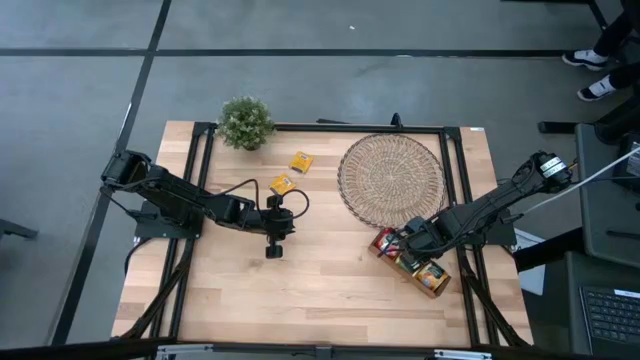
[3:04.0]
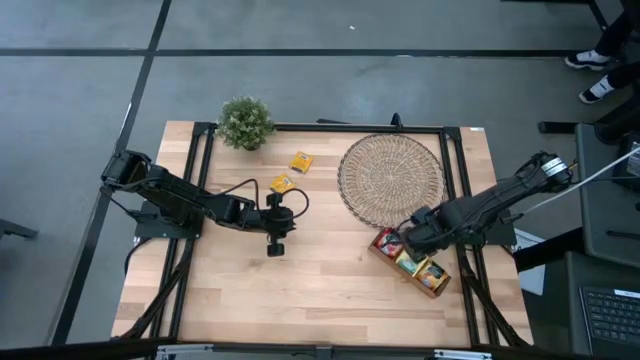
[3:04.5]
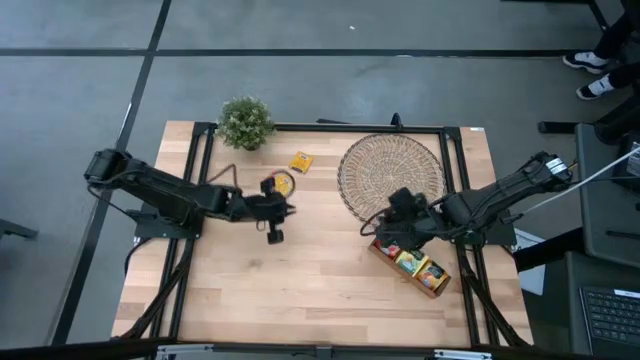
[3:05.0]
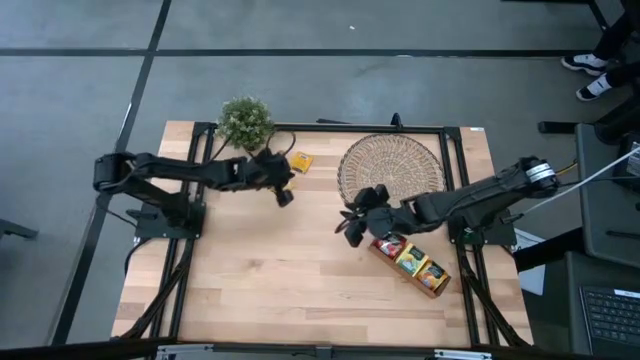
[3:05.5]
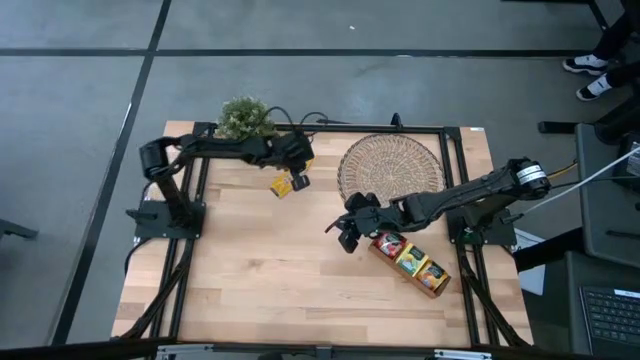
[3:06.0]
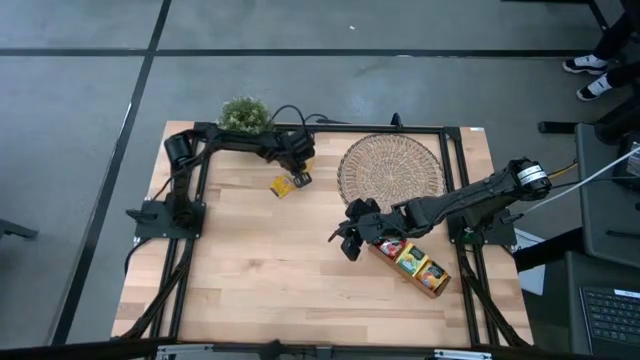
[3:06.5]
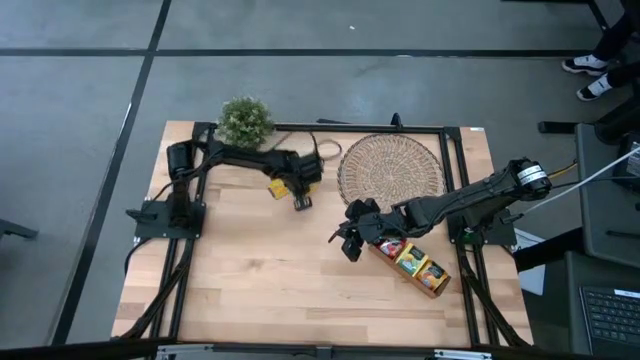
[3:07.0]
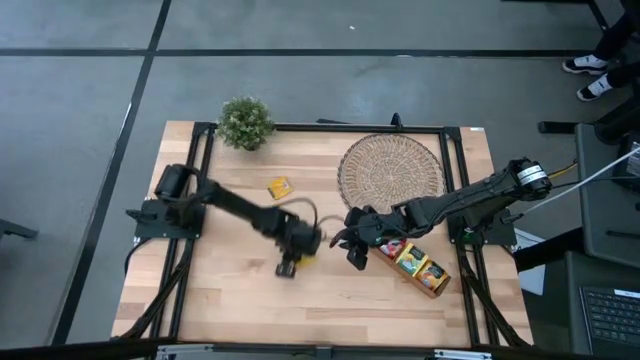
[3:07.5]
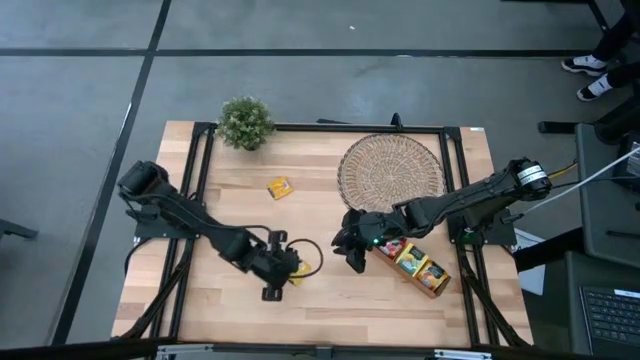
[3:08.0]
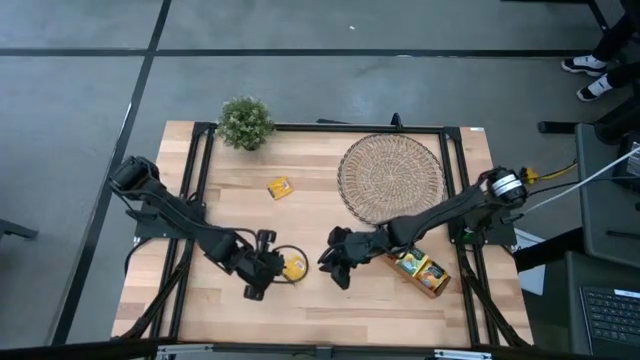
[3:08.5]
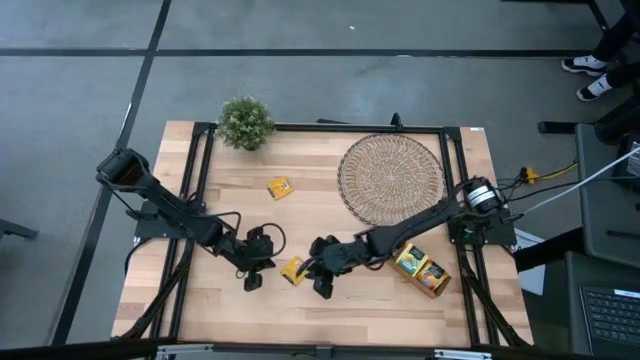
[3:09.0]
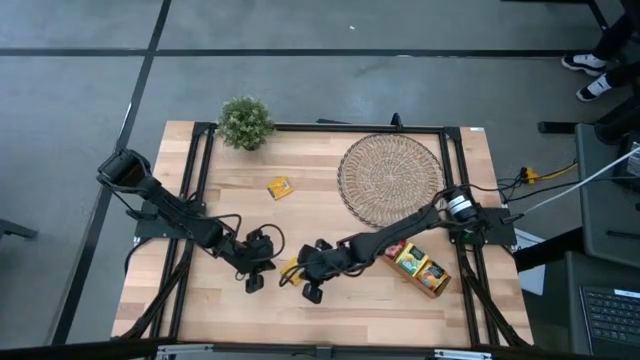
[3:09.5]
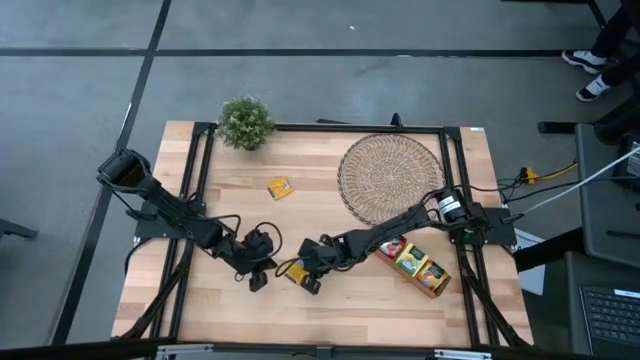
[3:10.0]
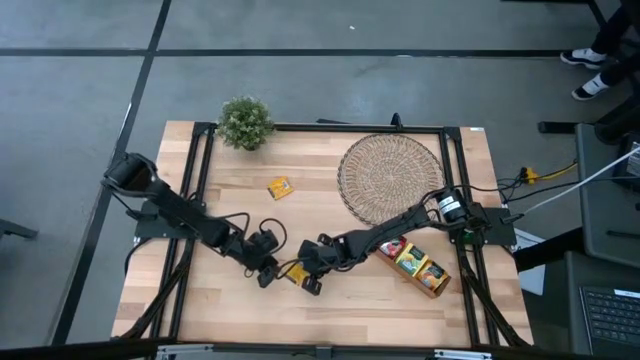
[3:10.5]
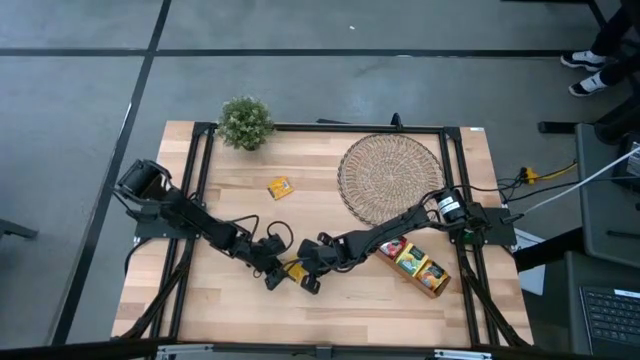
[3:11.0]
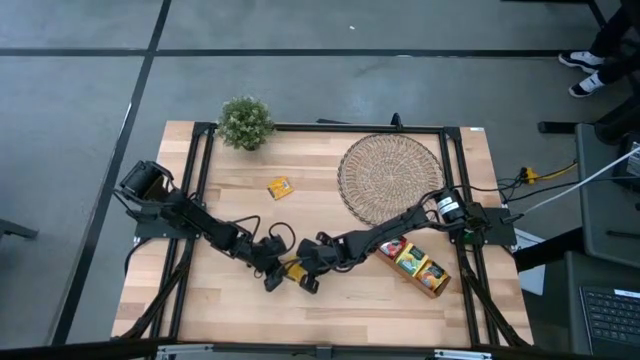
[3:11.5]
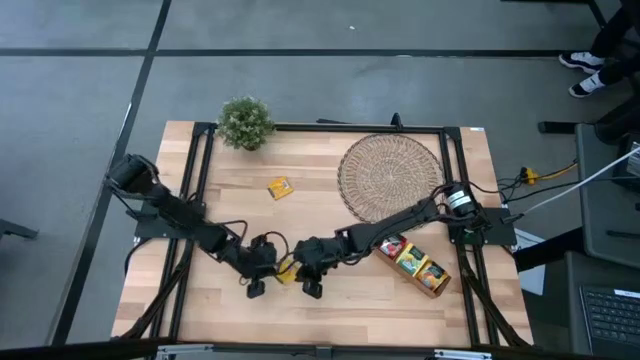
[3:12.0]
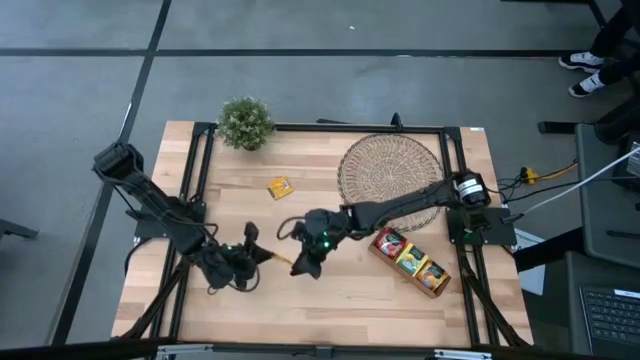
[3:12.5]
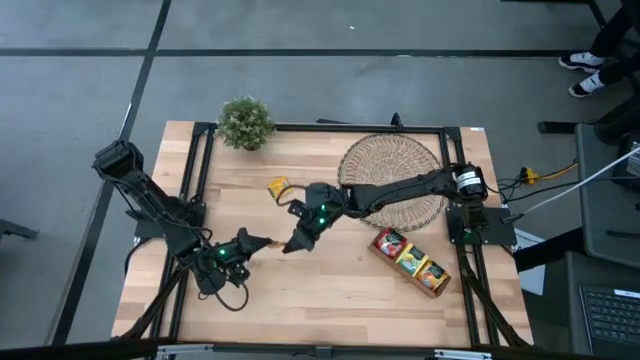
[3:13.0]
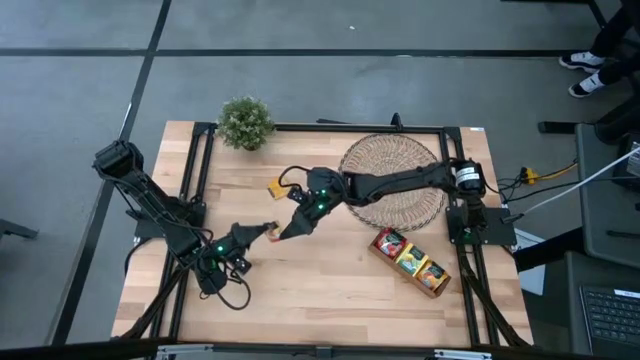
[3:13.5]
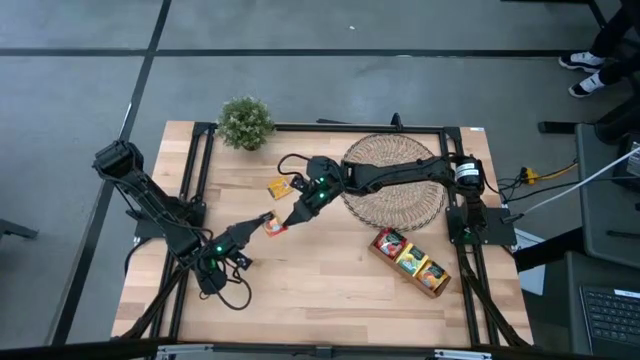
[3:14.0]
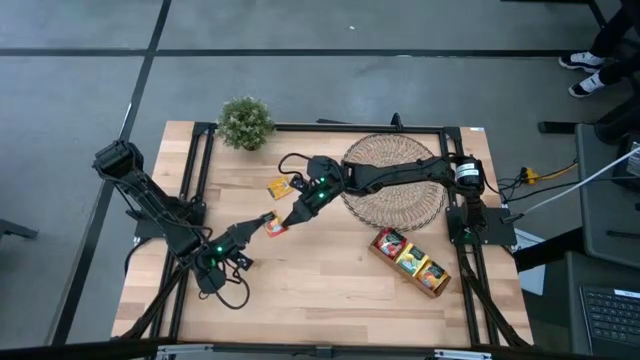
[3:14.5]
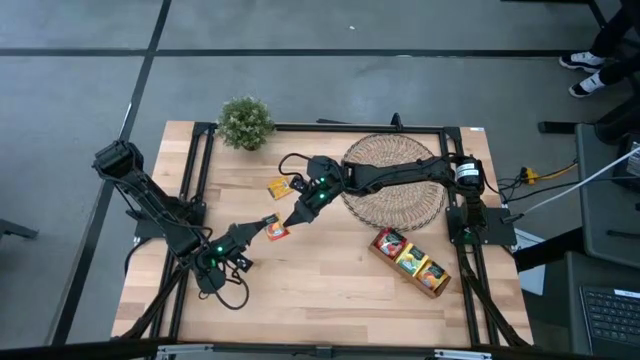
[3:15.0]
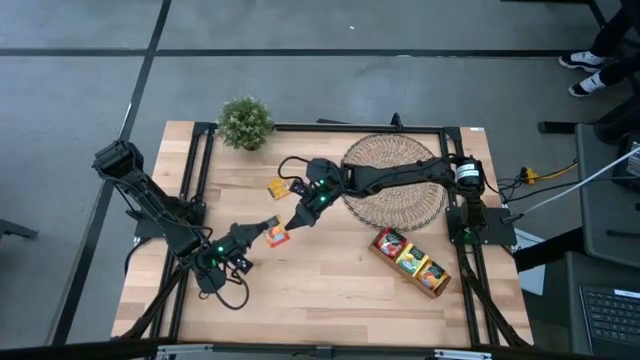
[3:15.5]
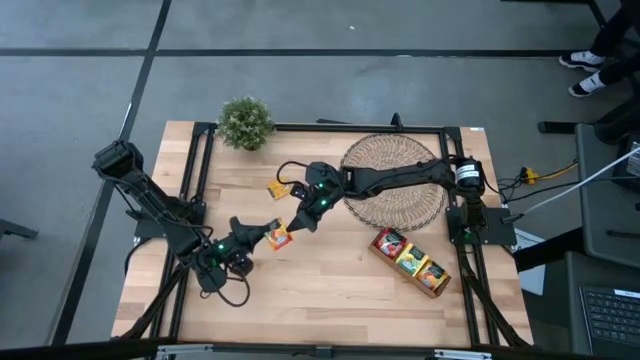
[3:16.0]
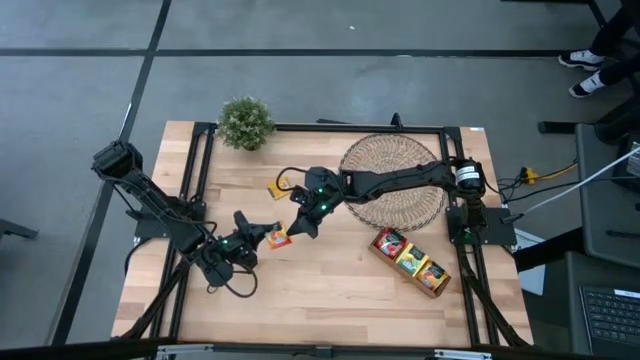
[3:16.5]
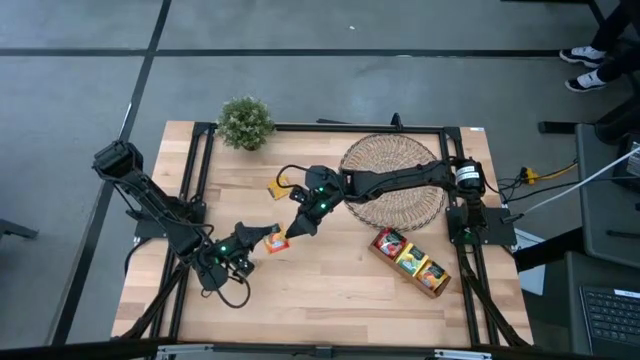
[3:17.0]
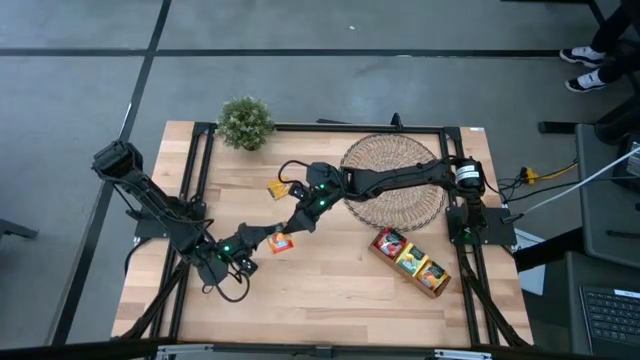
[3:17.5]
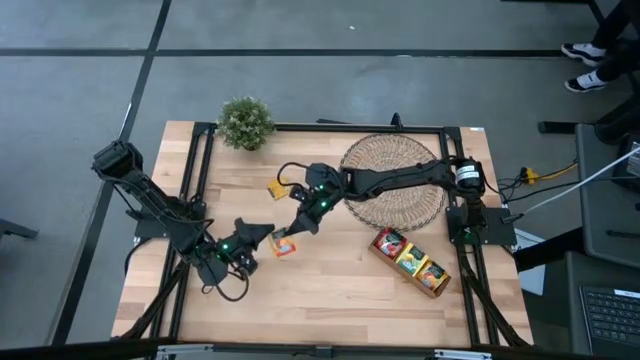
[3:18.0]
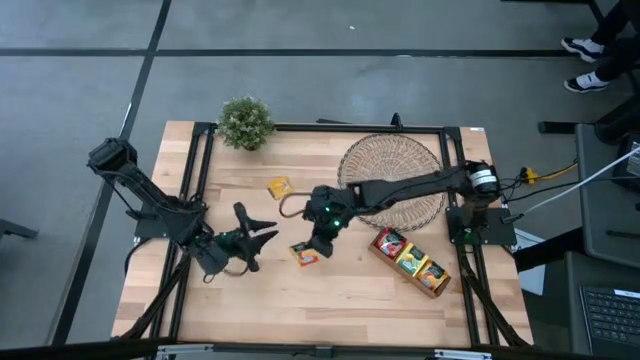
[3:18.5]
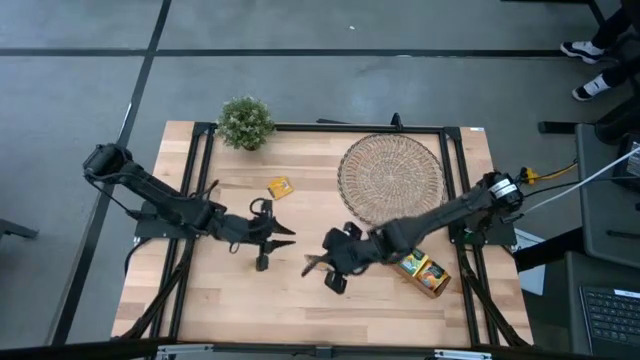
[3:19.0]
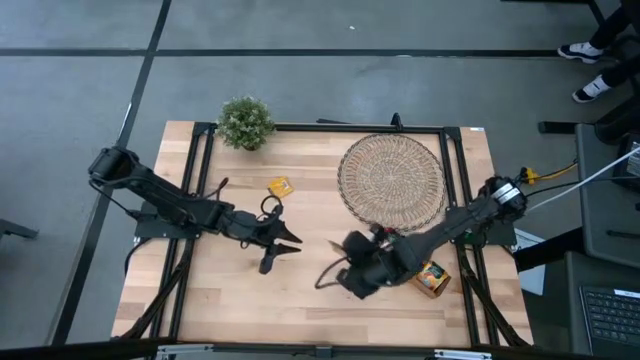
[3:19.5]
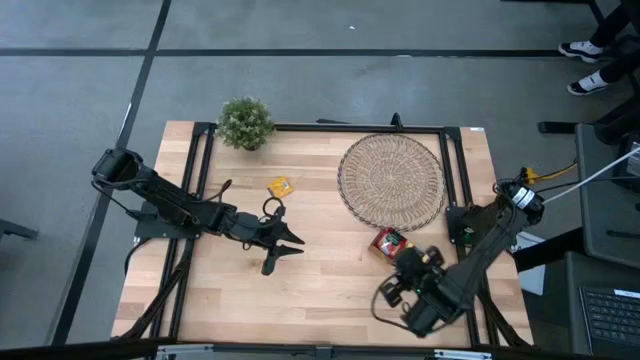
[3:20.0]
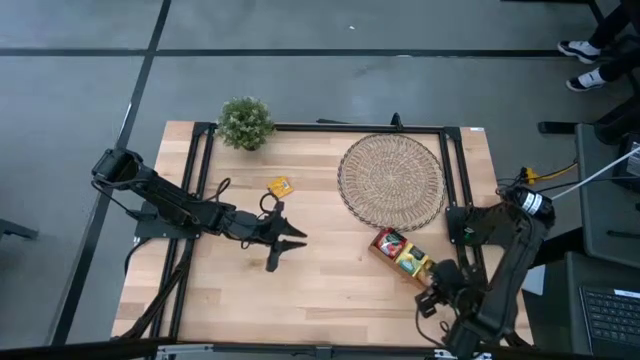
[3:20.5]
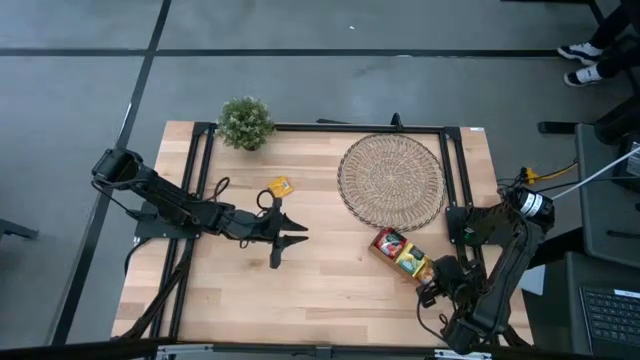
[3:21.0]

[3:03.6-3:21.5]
Task: Pick & Place Tea
Put the top orange tea bag into the right slot of the wooden organizer

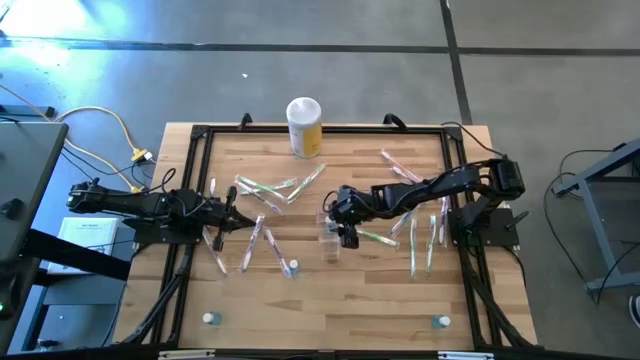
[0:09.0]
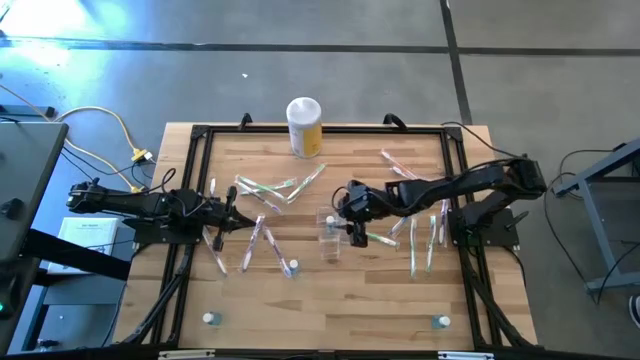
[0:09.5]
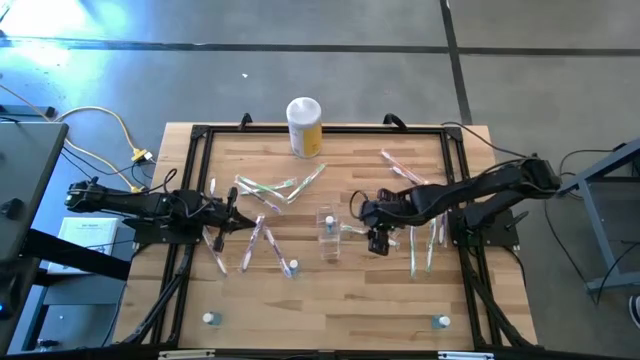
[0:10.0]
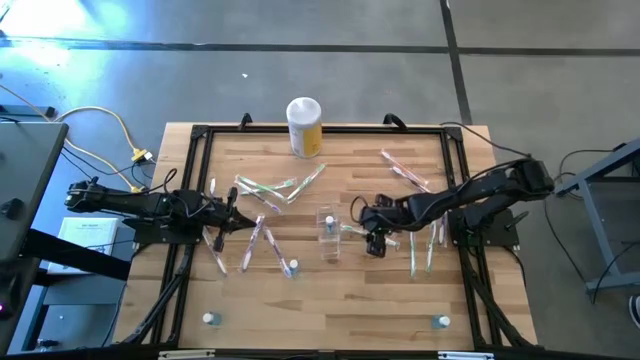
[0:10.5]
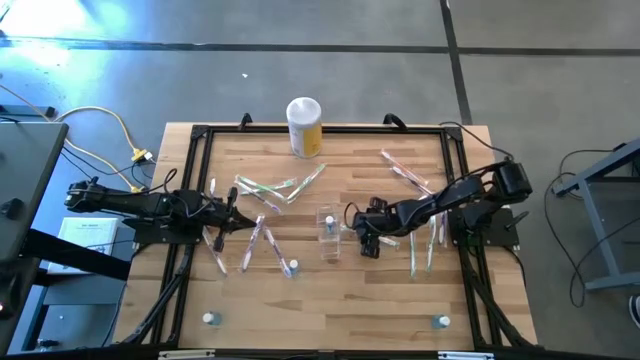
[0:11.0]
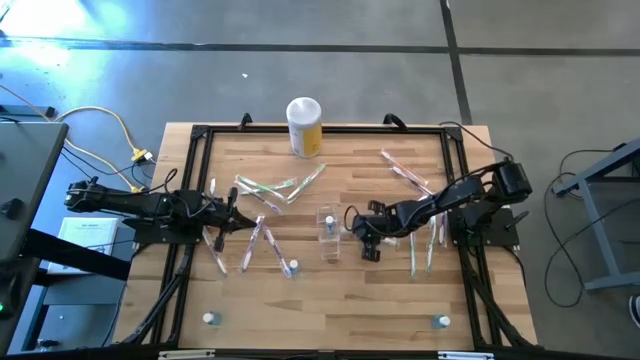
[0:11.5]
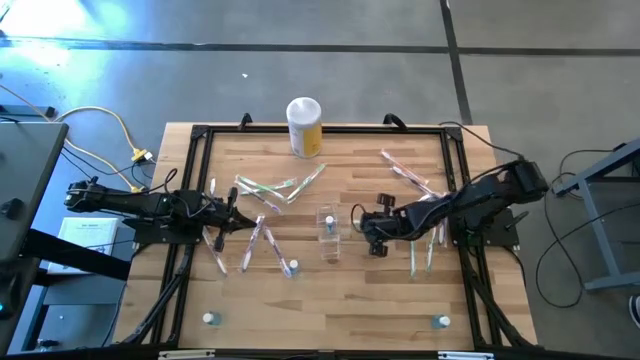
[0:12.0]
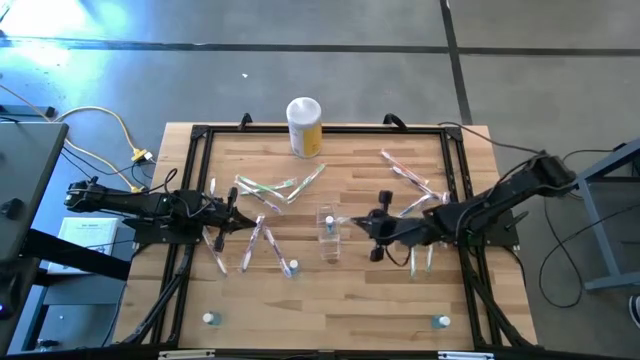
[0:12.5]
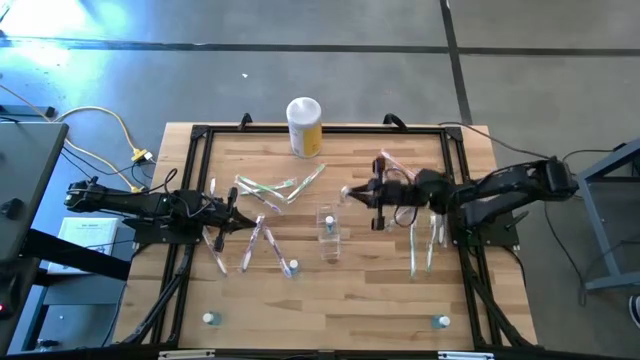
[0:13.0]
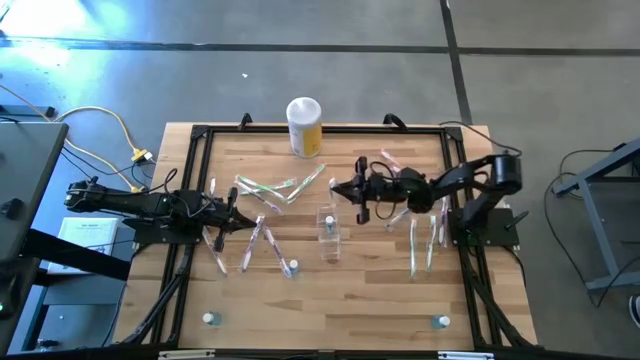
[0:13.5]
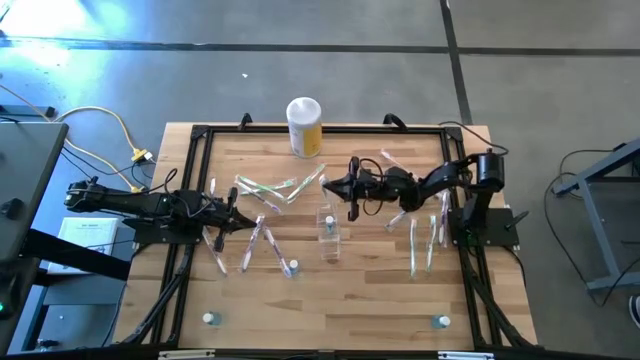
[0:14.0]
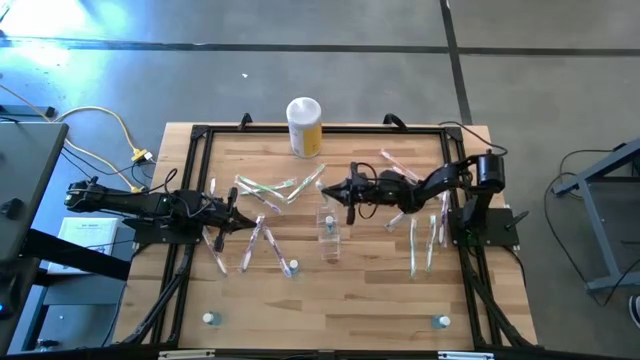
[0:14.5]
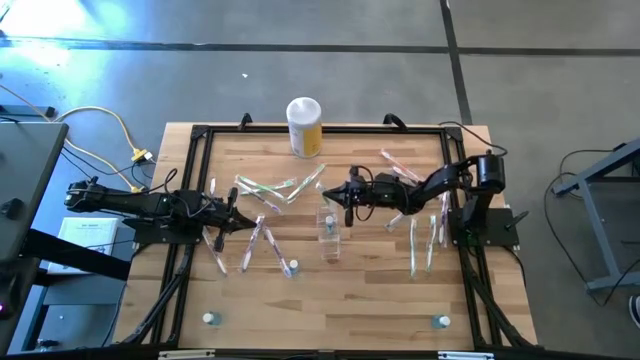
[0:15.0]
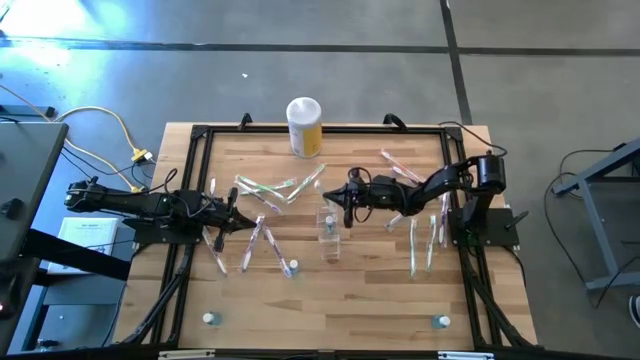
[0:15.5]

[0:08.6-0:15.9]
Task: Pick & Place toothbrushing station
Put the green toothbrush into the transparent organizer
